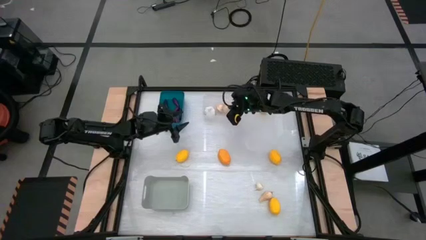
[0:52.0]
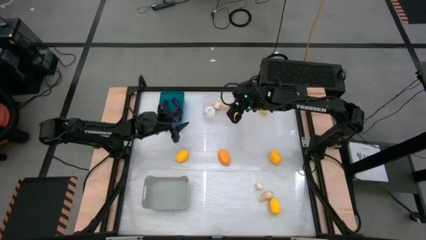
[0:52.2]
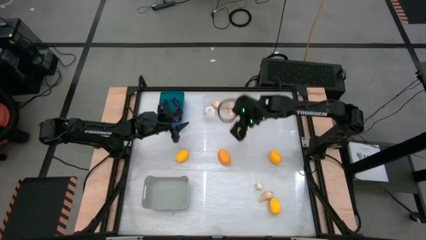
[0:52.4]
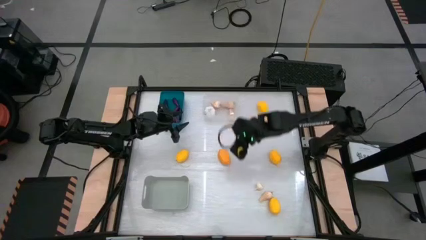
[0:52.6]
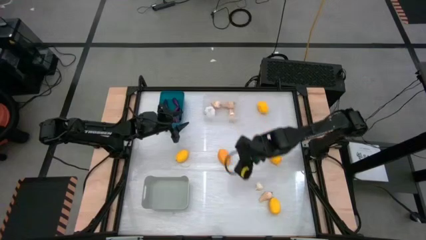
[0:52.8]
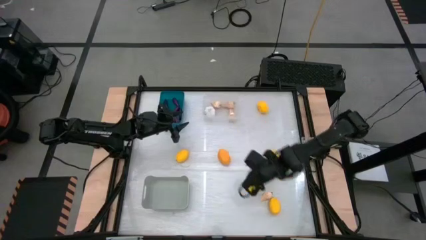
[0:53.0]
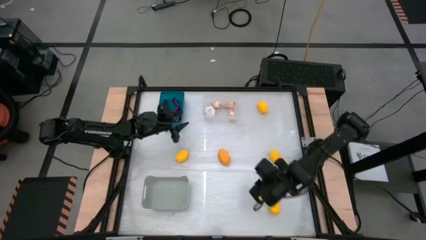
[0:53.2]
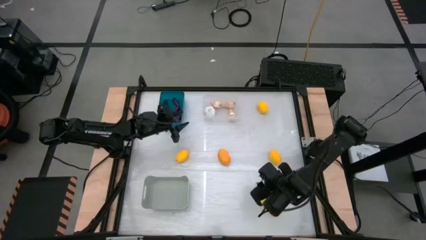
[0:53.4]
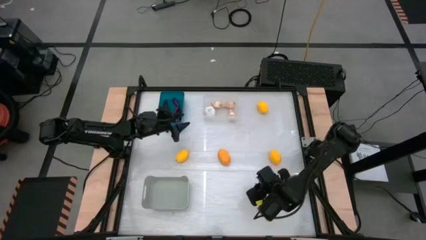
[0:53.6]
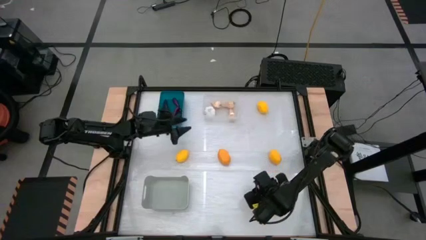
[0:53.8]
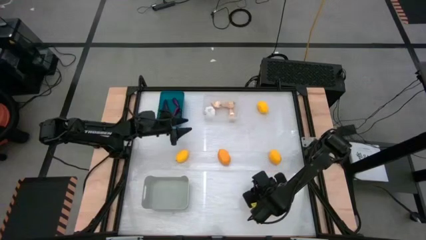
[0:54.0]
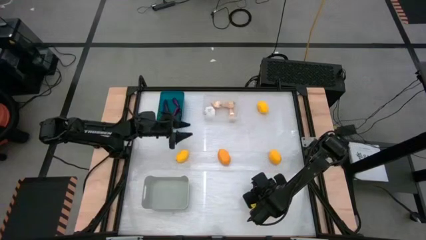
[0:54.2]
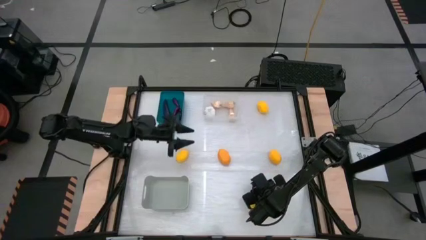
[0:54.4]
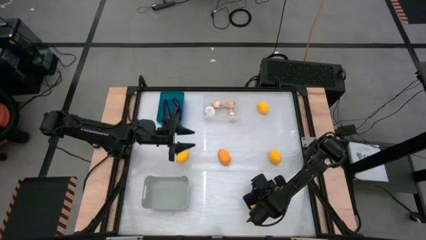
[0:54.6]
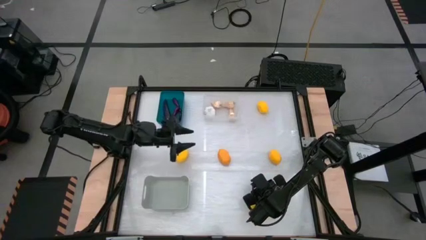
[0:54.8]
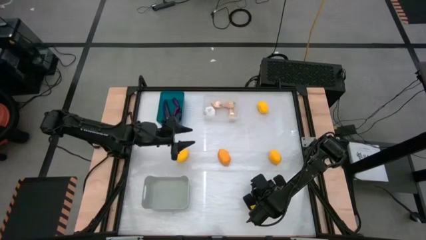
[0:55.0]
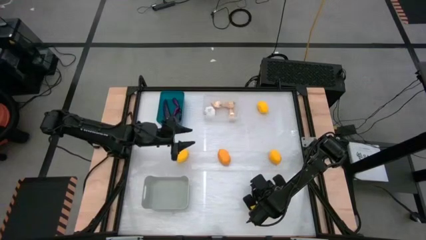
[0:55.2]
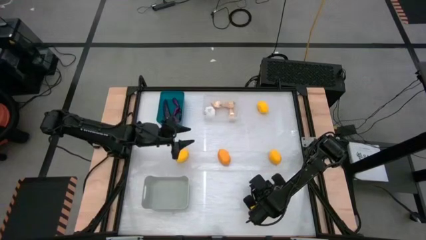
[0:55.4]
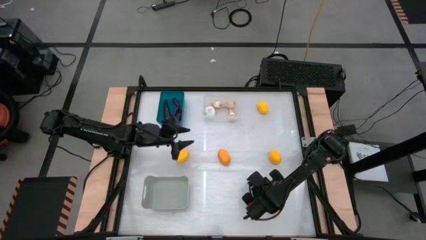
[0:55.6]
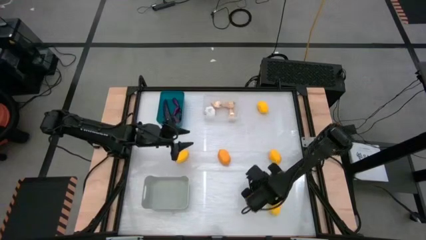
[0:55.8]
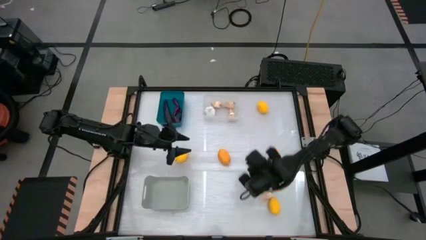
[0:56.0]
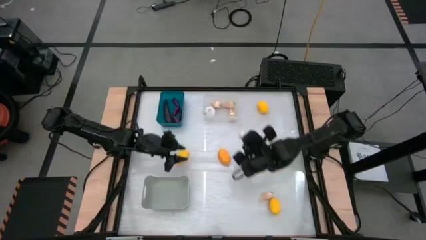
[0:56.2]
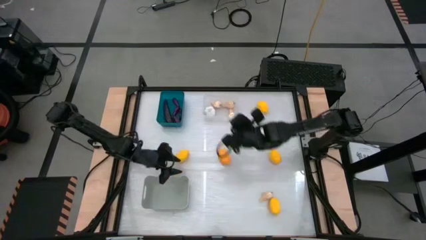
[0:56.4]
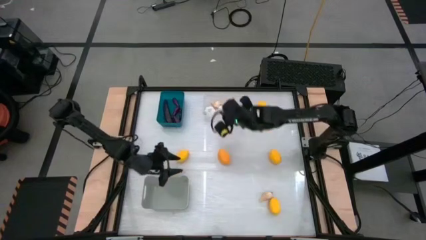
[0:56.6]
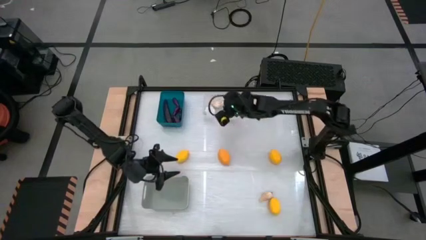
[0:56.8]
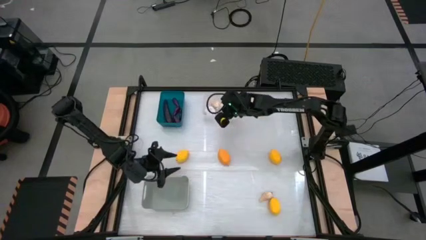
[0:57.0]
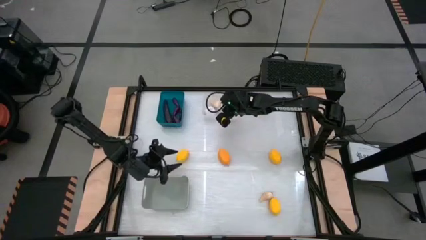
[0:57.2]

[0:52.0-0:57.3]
Task: Sort produce into baskets
Put the garlic into the transparent bin

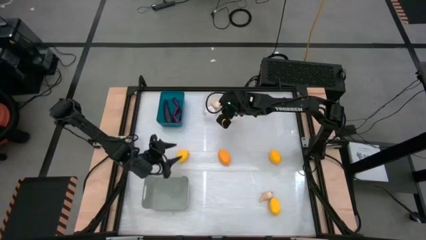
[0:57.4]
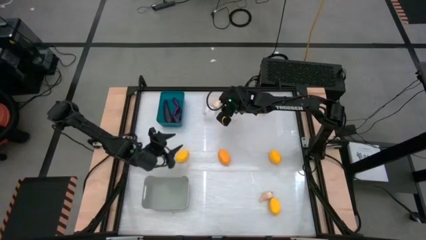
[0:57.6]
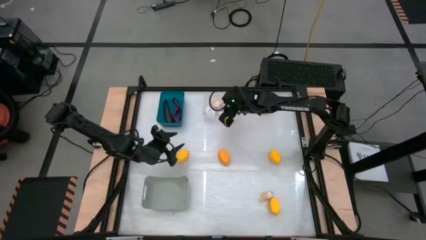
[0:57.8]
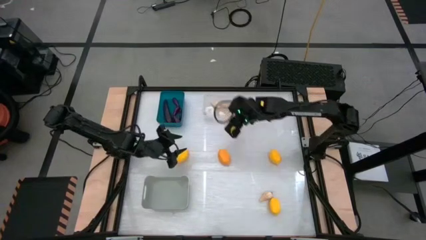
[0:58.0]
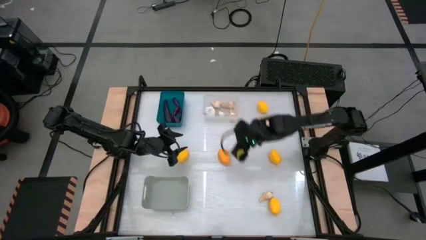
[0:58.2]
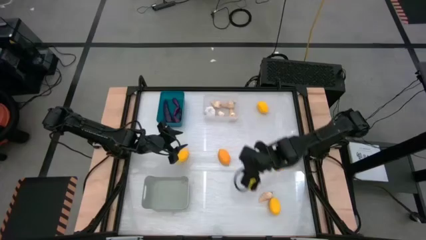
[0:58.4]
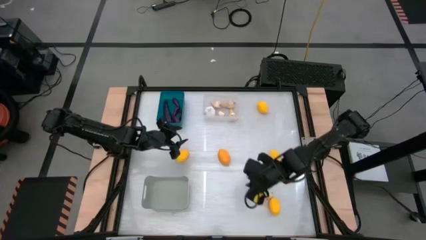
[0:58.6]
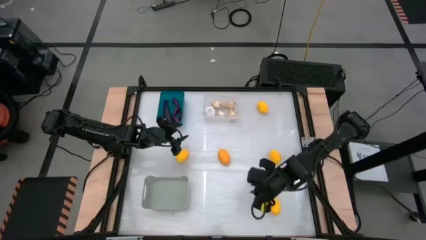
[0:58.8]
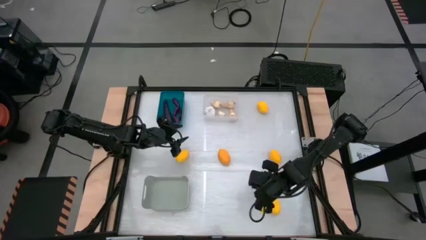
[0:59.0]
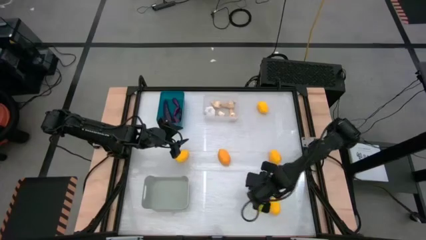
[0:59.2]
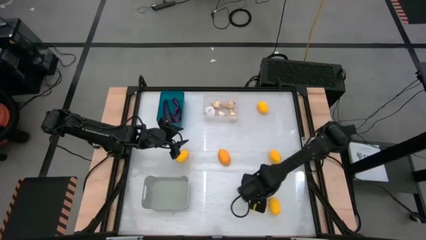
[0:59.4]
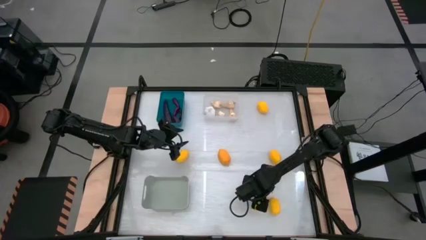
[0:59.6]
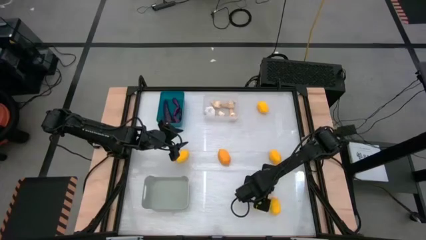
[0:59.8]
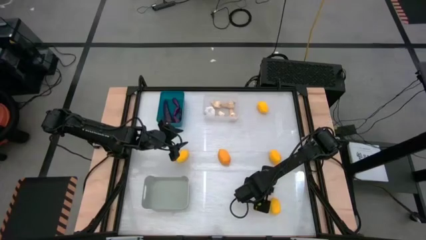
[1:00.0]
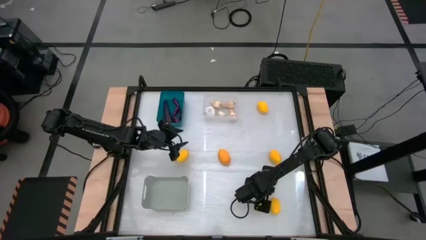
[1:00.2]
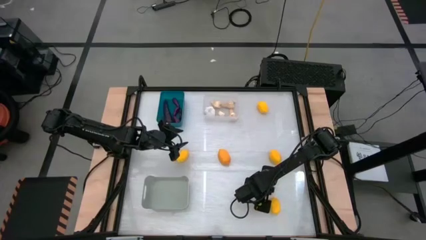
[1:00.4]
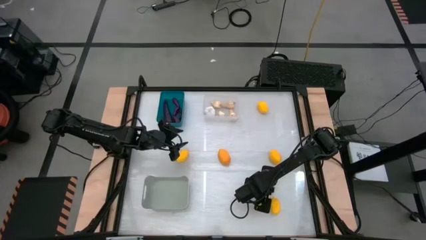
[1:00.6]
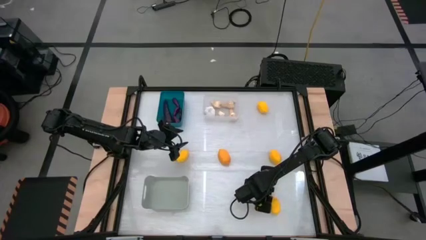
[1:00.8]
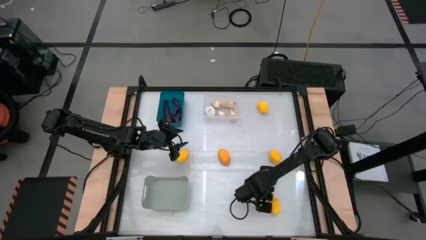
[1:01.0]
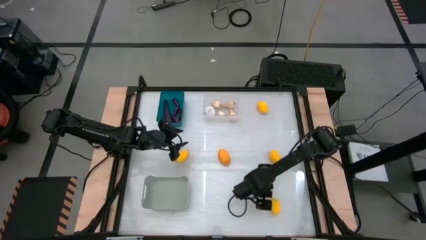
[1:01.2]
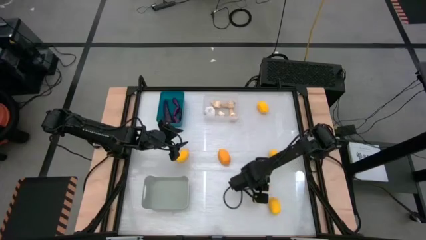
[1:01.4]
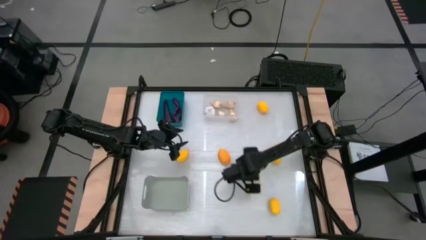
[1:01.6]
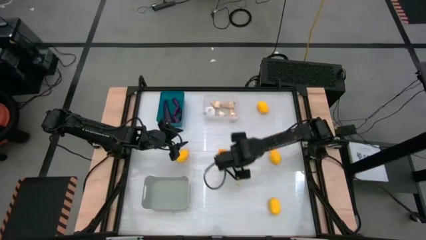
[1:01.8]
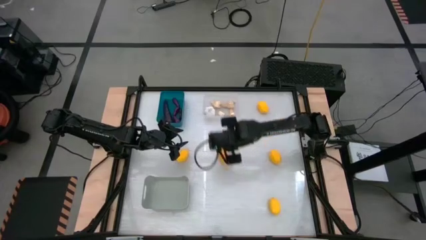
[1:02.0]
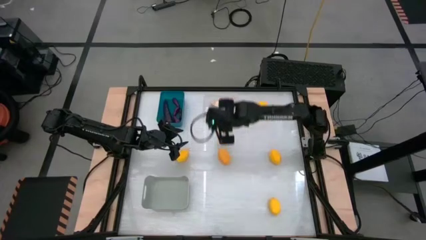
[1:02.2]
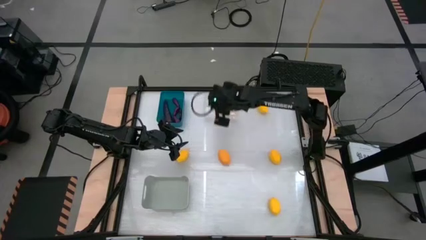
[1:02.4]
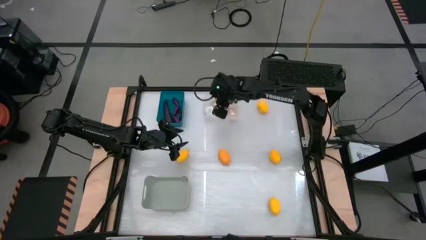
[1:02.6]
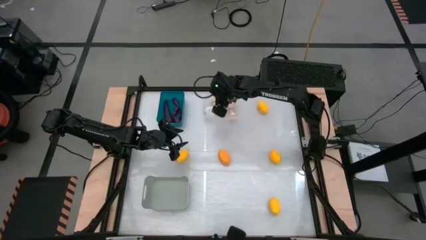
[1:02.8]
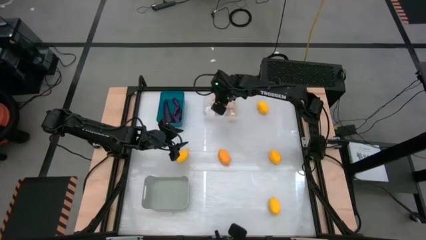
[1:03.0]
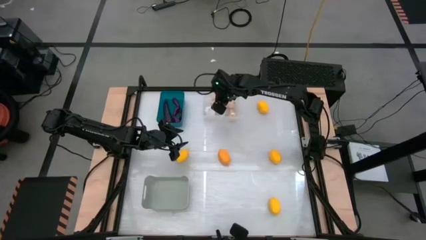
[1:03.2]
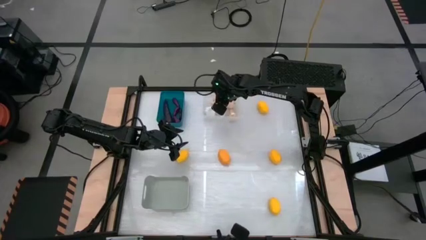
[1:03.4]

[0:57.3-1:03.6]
Put the garlic into the transparent bin

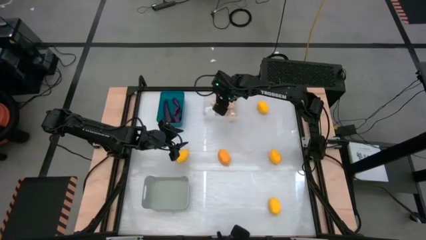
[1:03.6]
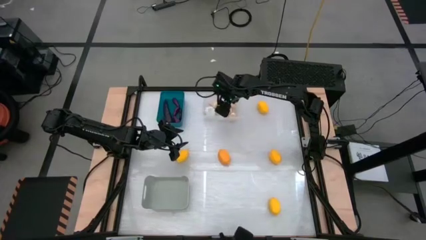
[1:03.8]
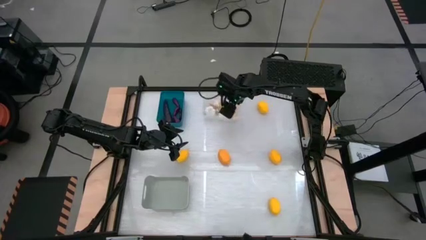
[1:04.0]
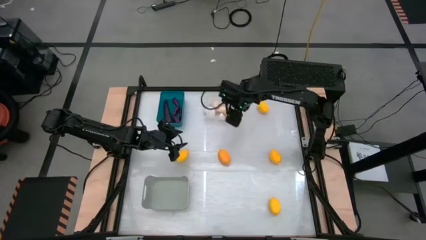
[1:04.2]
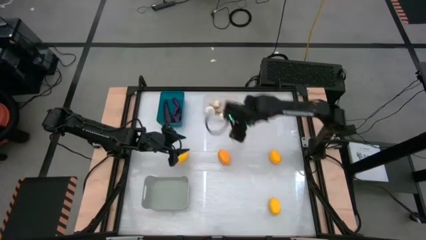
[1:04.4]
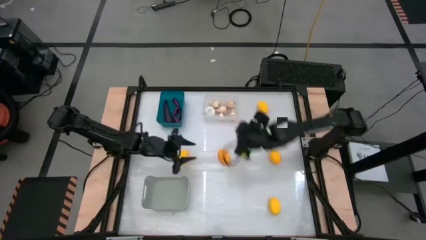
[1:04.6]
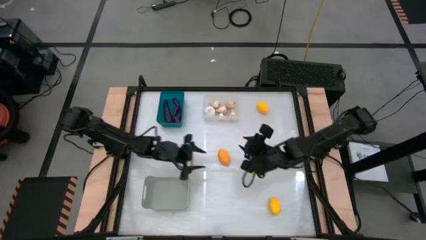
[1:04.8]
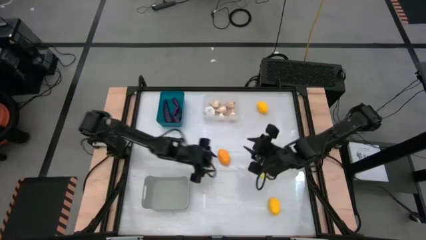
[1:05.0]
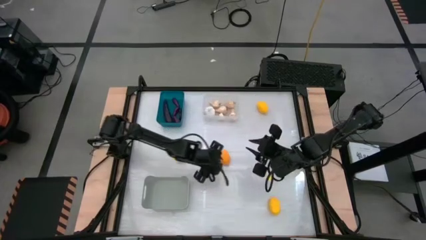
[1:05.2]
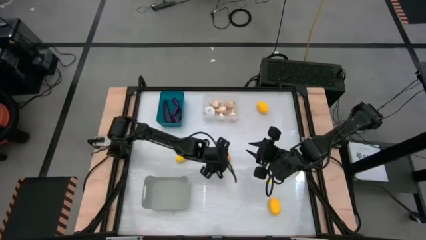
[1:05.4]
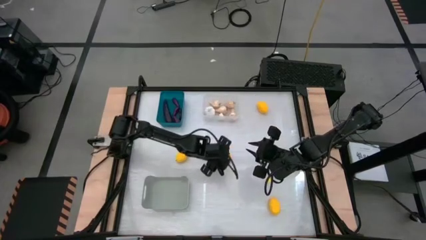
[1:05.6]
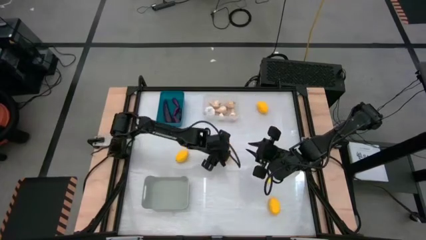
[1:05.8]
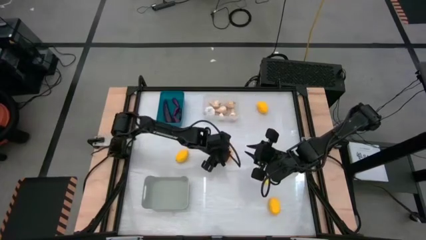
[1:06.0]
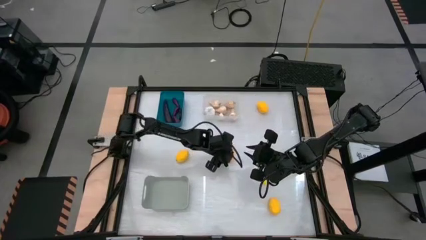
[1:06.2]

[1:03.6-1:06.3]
Put the lemon into the gray bin

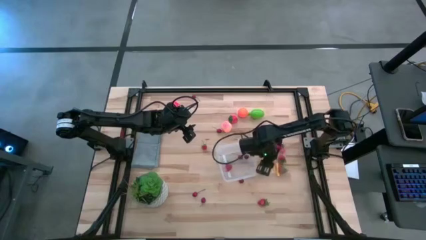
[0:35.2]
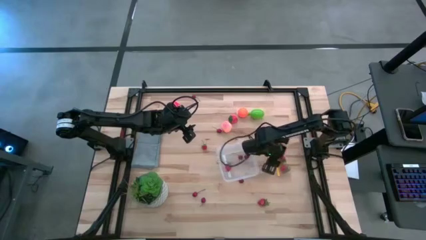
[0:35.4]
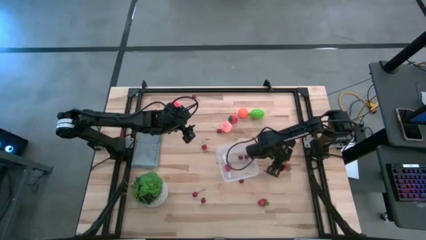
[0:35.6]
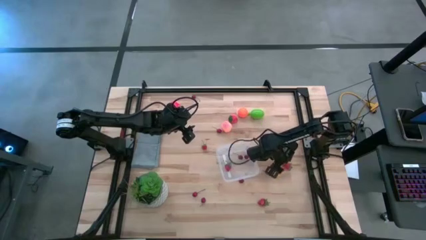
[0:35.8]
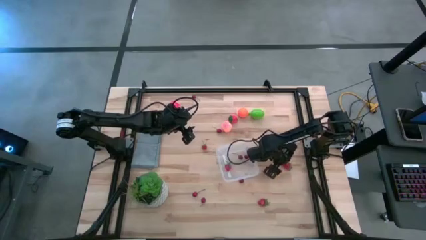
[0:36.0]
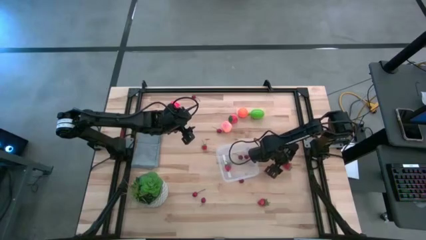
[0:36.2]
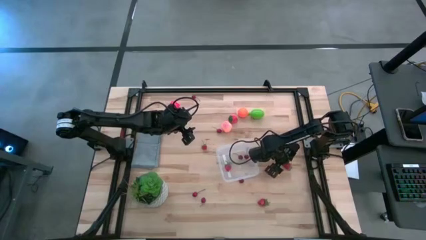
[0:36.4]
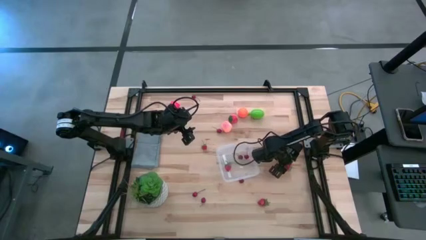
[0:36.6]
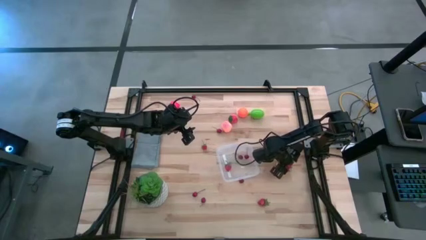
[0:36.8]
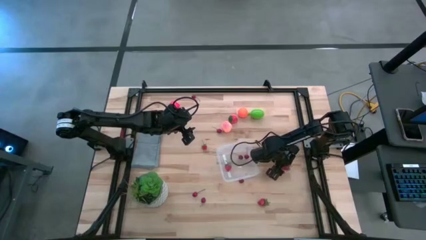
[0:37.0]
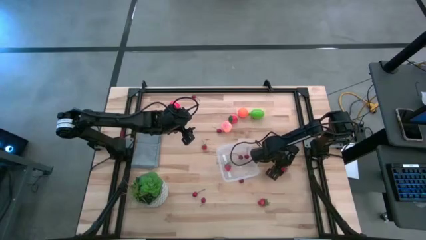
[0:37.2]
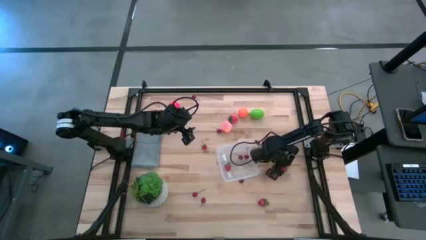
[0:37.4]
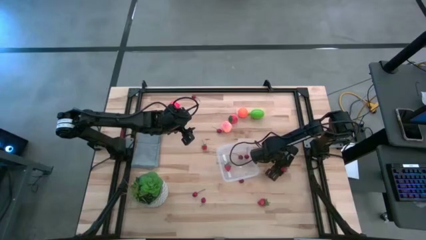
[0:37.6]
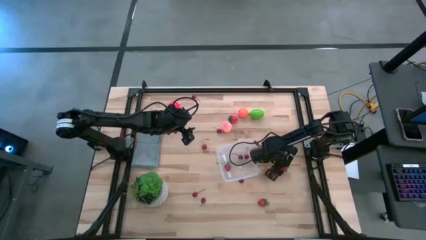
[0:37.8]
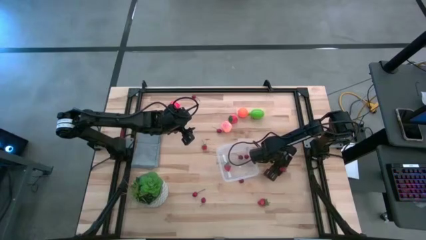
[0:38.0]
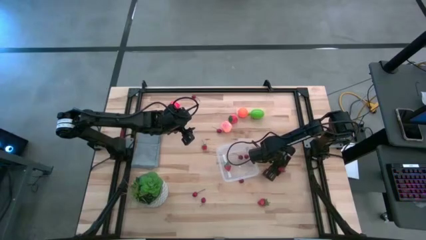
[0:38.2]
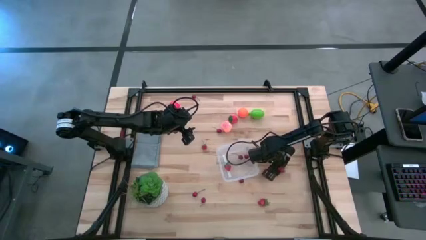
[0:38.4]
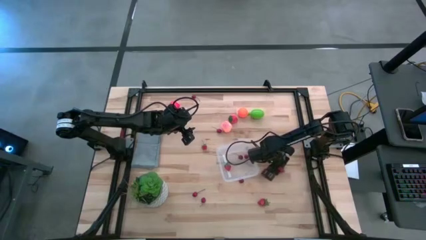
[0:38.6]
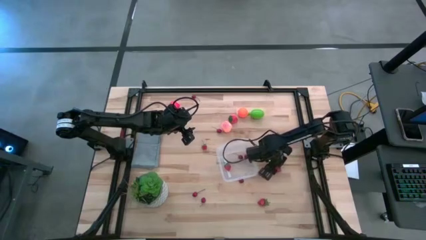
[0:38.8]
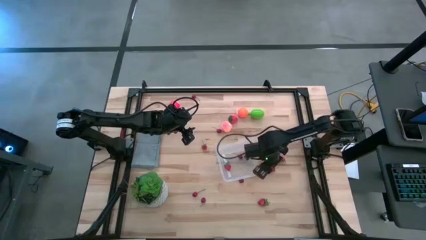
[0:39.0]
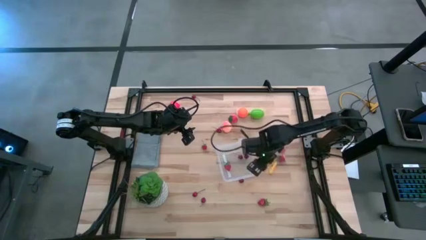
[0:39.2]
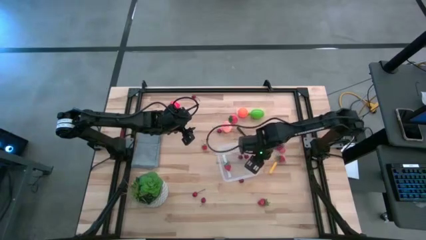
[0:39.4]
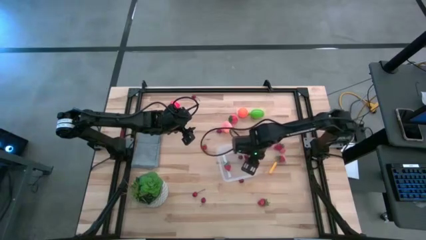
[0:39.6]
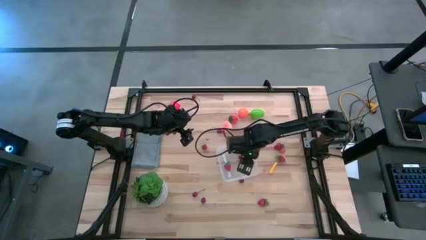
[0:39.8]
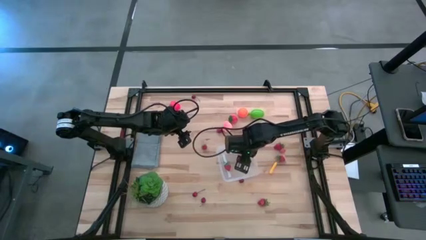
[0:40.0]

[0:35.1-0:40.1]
Task: Pick and placing Produce into tupperware
Put the strawberry into the transparent bin
